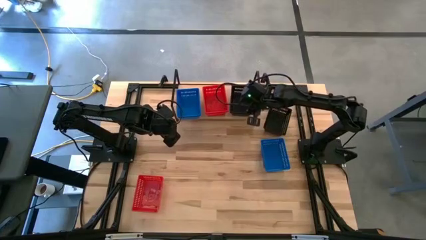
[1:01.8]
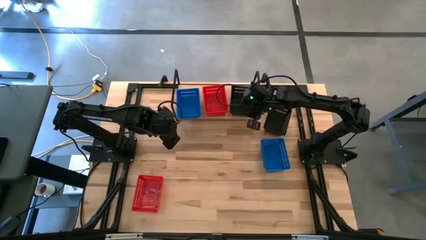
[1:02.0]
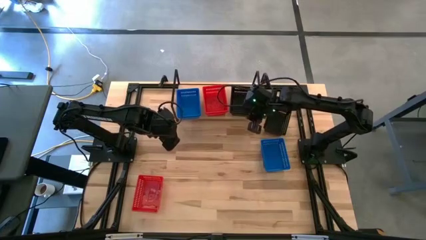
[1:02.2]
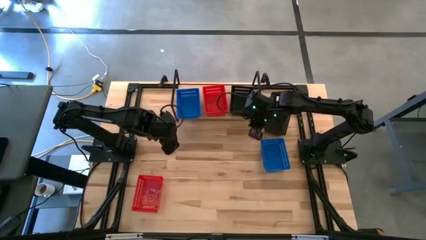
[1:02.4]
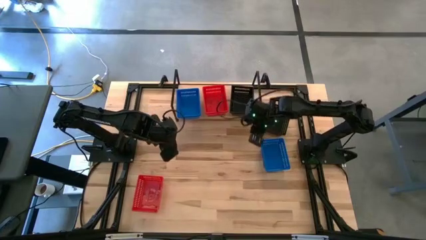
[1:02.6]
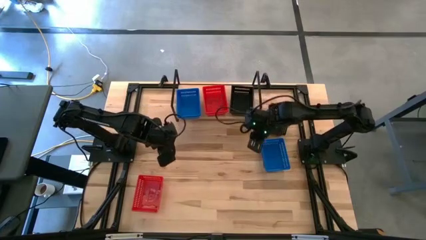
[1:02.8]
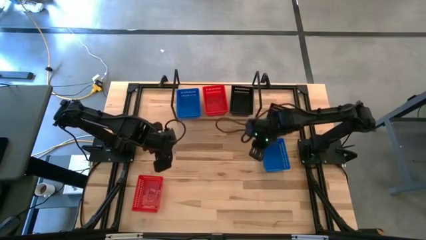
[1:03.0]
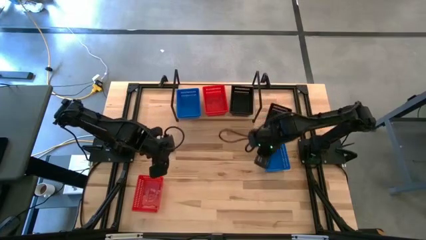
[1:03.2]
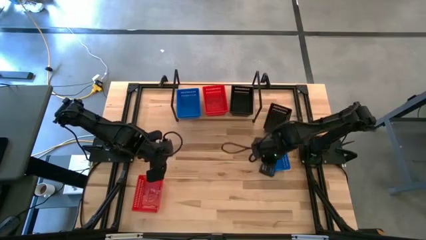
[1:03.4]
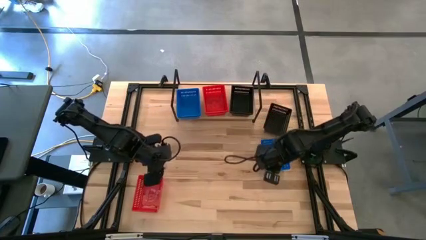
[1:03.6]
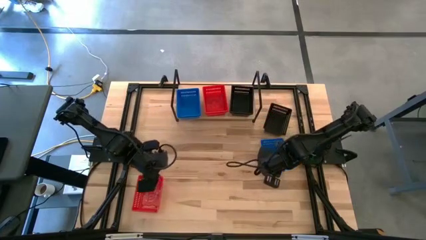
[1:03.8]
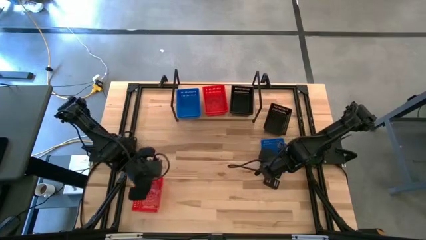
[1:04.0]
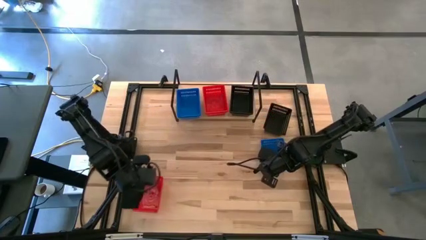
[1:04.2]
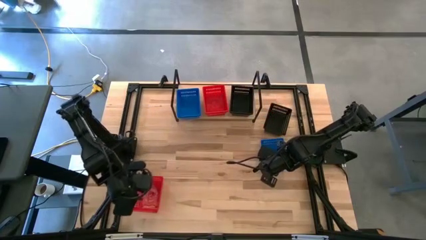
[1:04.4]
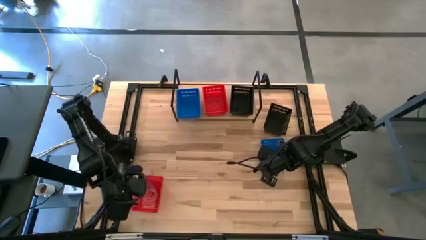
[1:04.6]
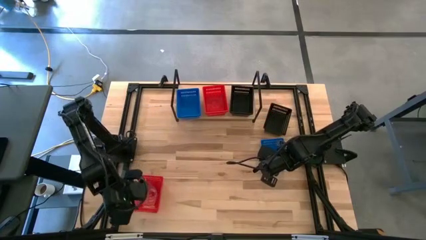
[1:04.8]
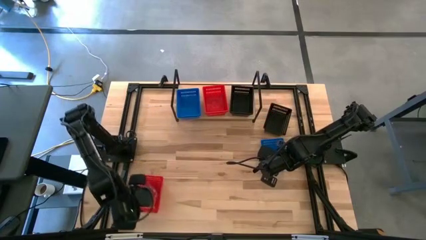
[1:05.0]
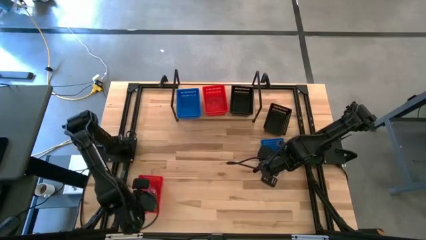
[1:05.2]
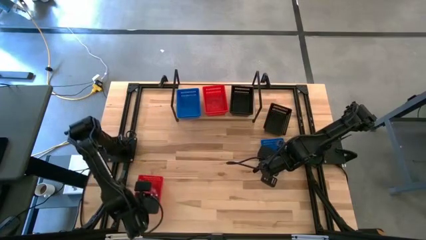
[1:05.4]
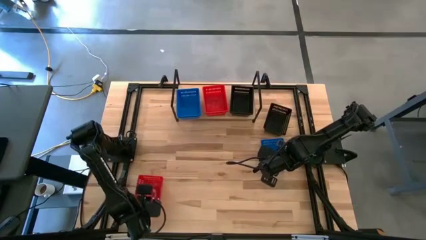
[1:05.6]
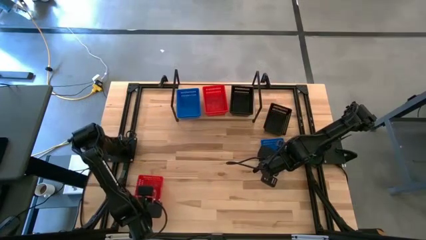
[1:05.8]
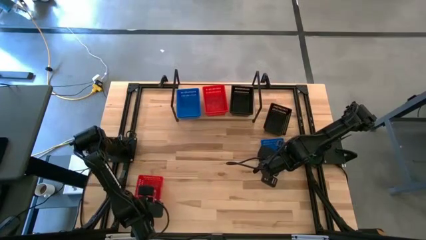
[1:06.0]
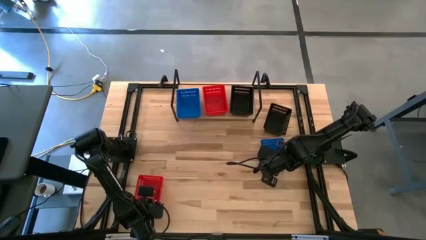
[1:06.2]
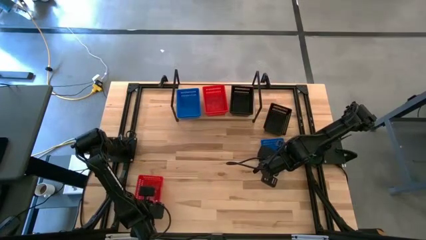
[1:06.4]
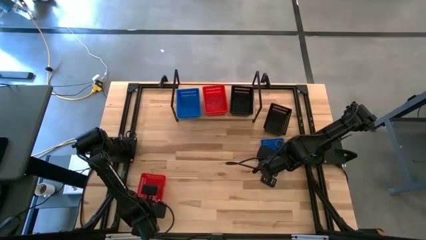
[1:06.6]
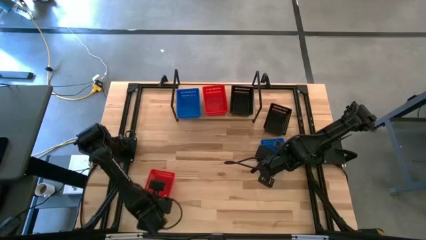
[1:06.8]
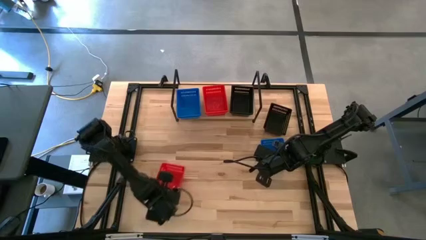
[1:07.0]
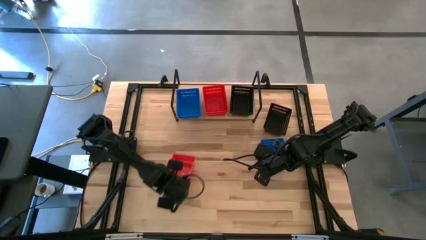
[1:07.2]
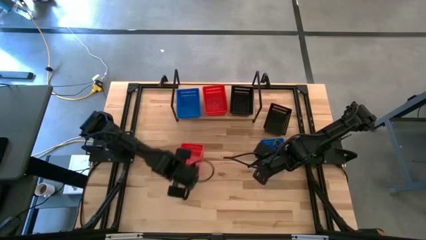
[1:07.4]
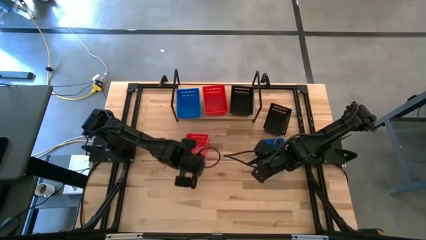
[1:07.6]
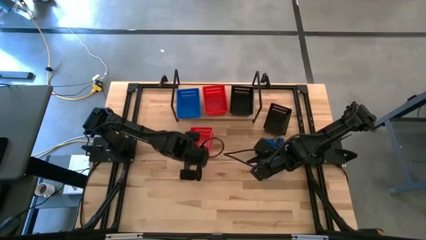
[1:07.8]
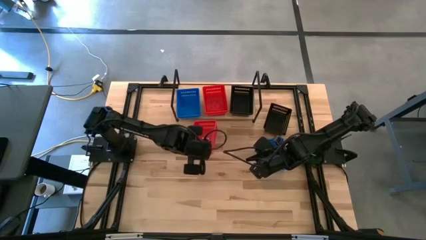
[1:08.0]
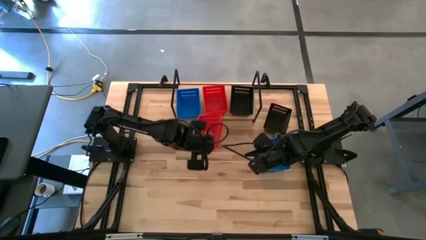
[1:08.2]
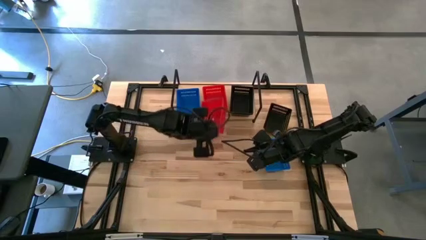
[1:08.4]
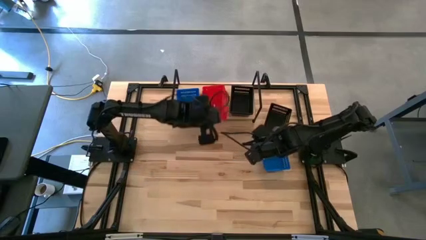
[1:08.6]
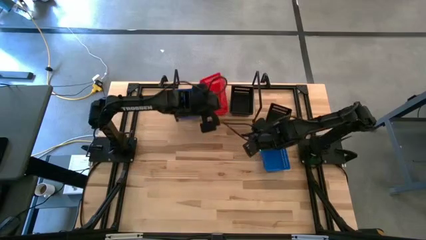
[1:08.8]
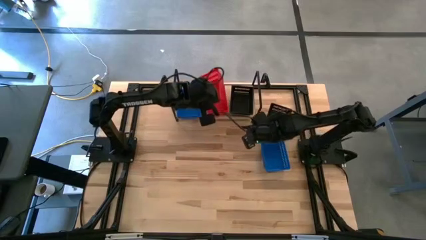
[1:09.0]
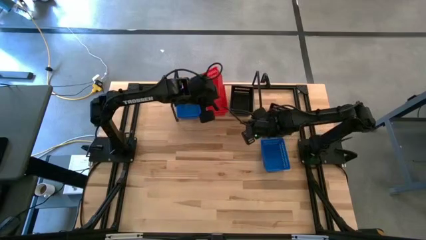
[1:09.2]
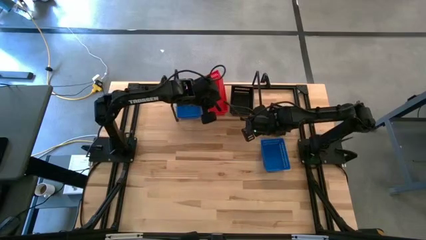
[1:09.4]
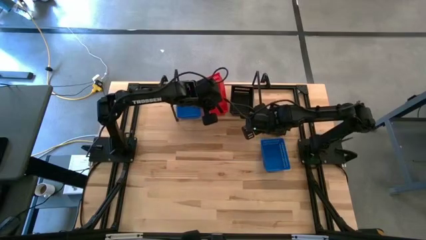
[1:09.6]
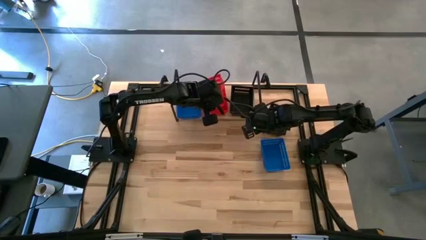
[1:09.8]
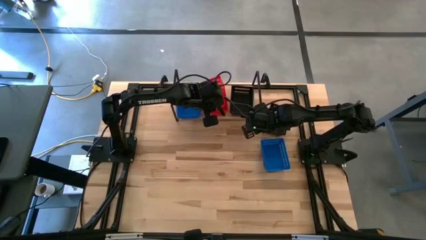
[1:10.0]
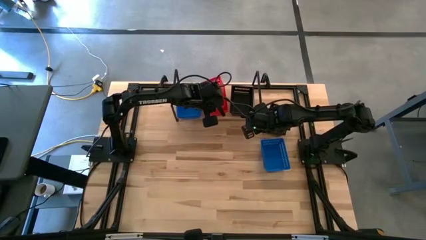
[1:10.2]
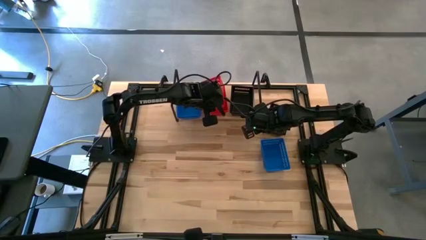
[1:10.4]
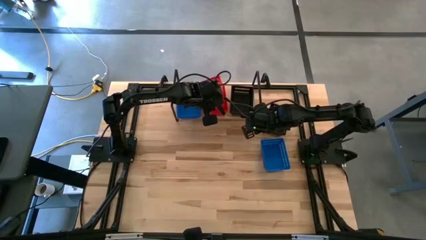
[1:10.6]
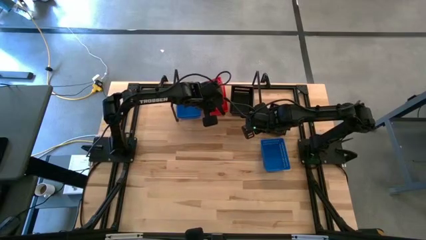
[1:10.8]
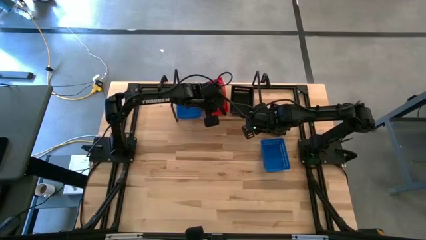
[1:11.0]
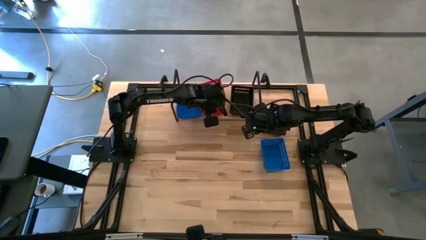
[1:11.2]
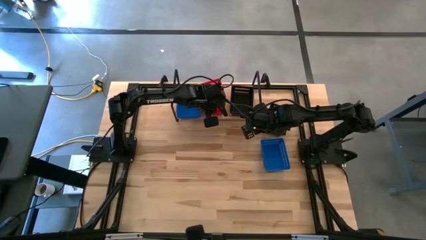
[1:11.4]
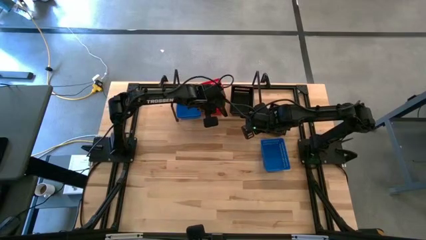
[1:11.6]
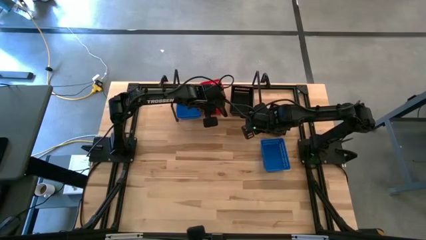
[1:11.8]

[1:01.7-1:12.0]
Task: Stack baskets on shelf by color
Stack the red bin on top of the red bin on the shelf

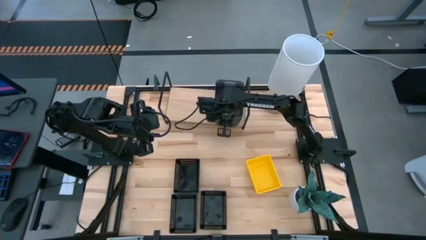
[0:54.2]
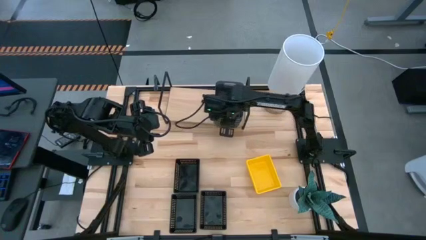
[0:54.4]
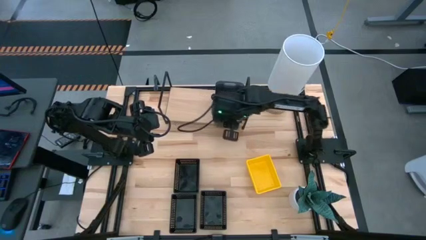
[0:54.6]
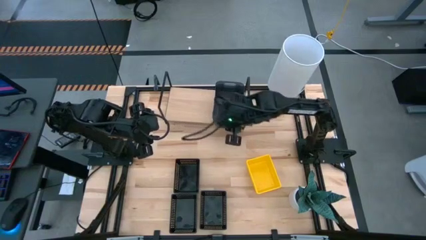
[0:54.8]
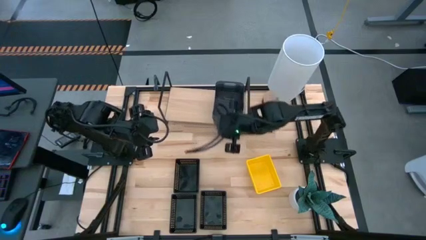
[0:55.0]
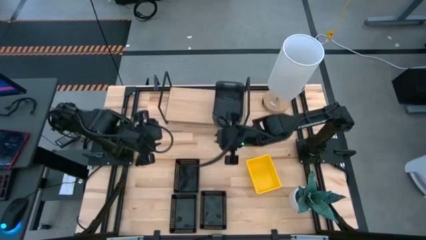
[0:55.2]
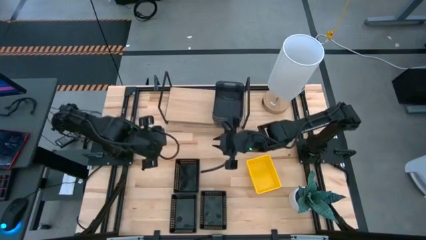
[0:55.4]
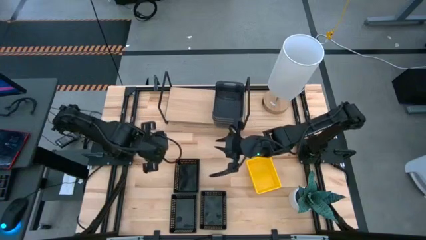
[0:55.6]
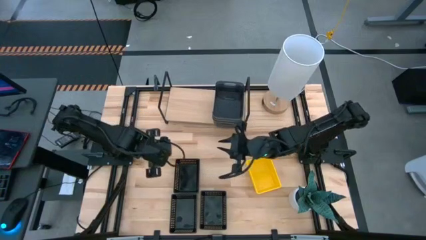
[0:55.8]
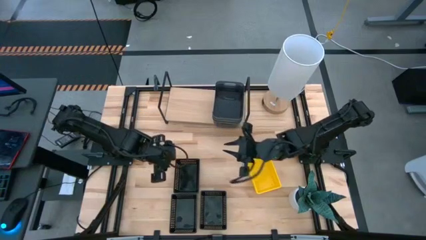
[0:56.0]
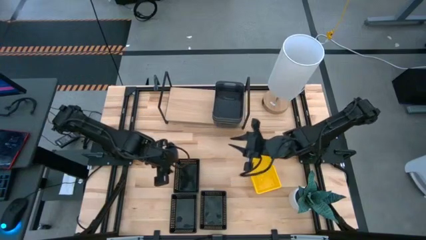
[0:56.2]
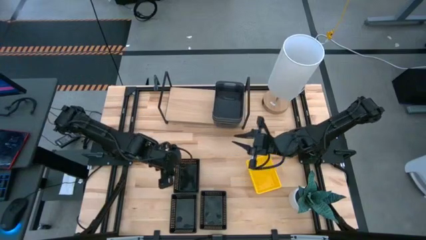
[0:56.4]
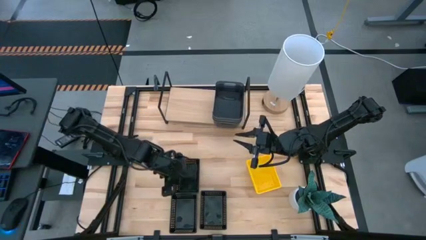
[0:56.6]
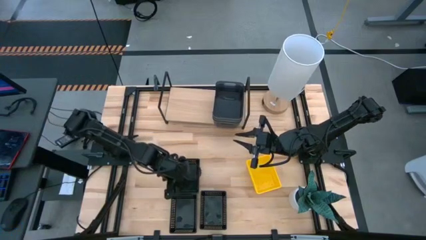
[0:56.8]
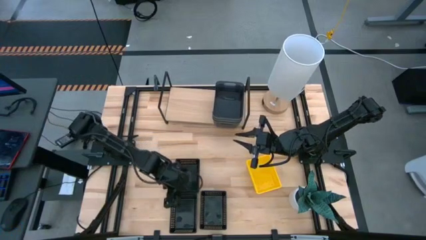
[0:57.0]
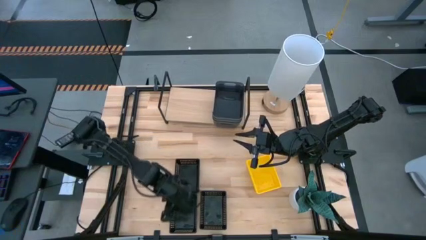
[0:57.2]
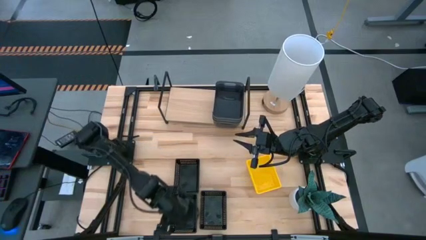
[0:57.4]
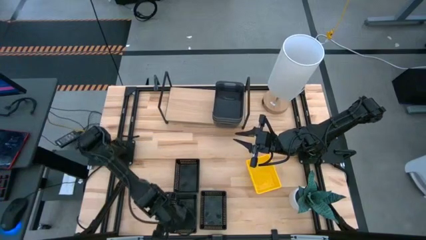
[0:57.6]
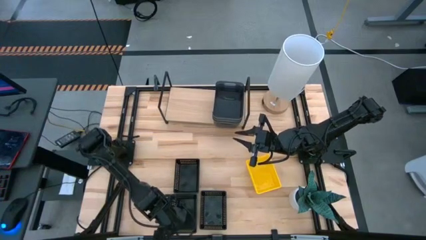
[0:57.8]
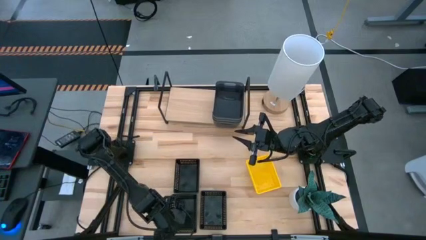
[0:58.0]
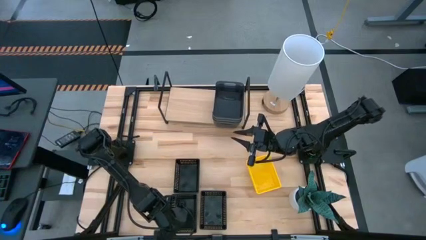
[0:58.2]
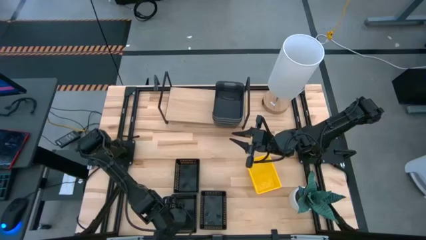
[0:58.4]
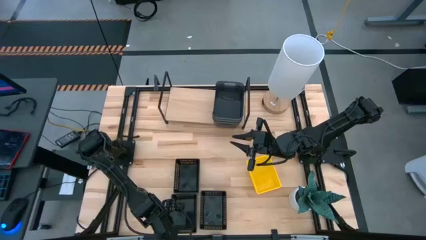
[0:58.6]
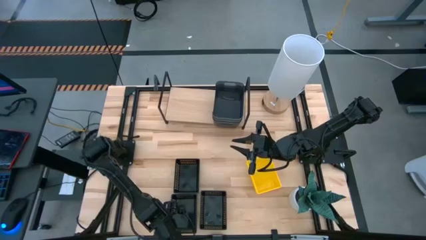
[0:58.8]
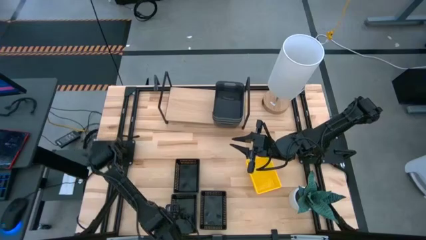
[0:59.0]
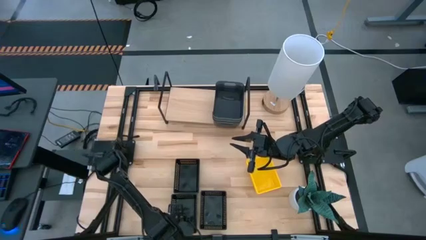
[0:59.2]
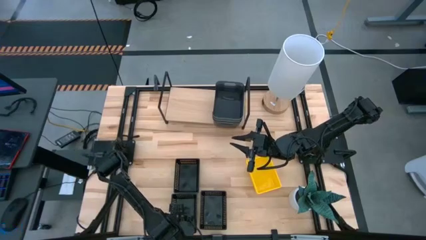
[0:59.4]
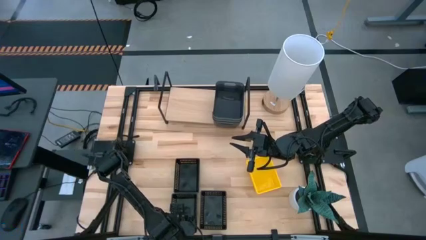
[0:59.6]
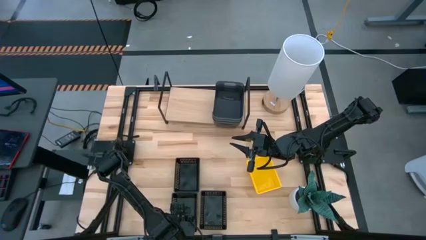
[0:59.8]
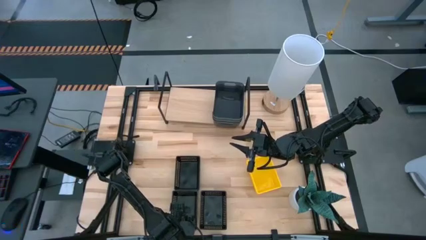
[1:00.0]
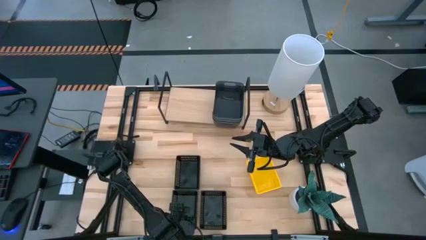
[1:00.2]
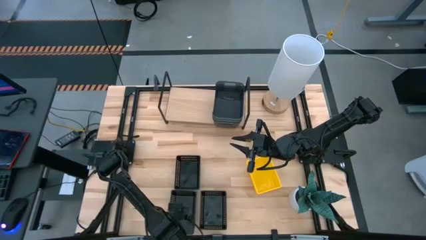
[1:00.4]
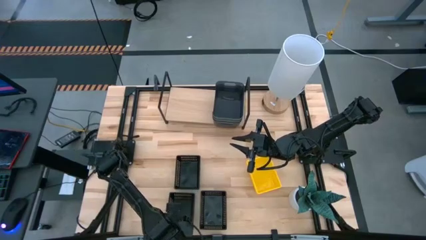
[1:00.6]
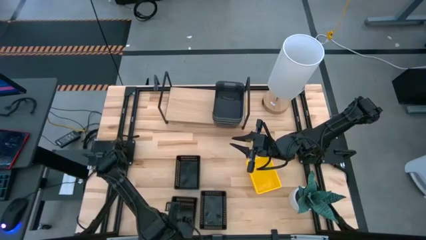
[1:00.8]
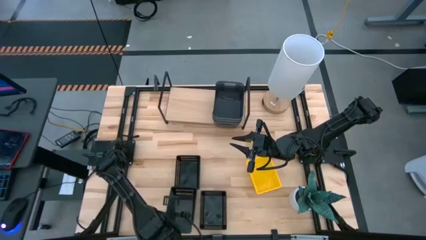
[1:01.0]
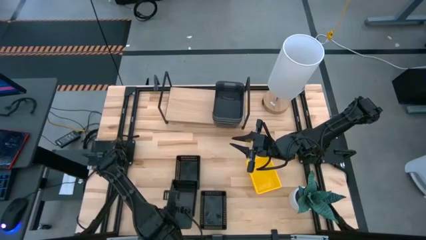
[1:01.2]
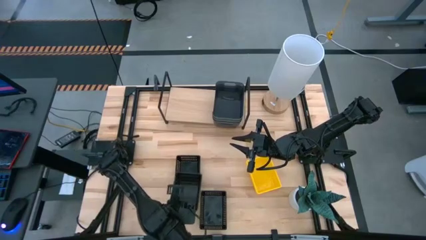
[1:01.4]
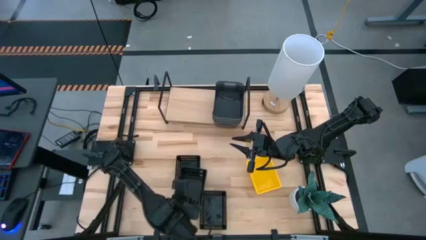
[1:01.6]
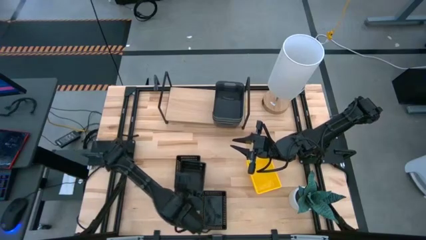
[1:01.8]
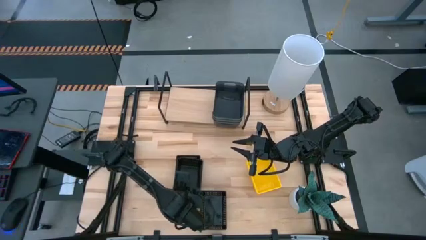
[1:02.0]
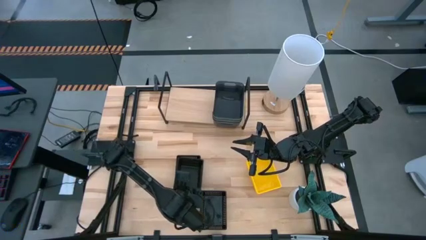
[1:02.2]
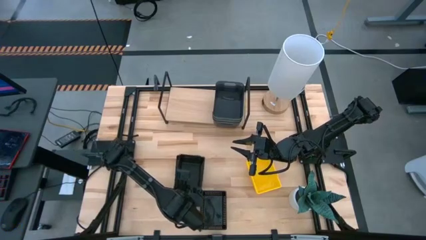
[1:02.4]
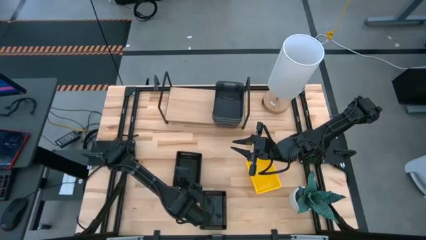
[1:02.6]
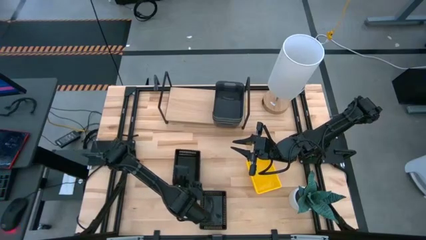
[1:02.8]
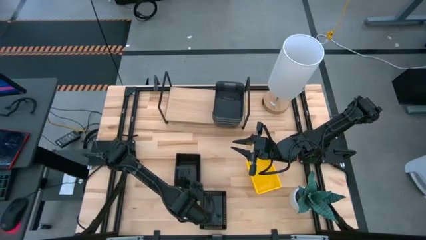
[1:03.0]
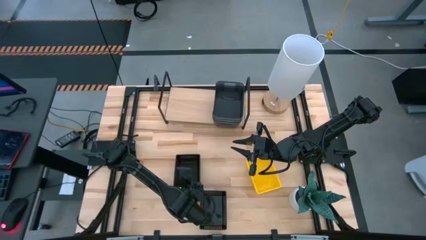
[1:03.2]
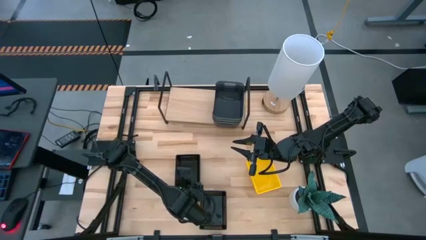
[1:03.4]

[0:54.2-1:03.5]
Task: Stack baskets on shelf by color
Stack the bottom left black bin on top of the top black bin
